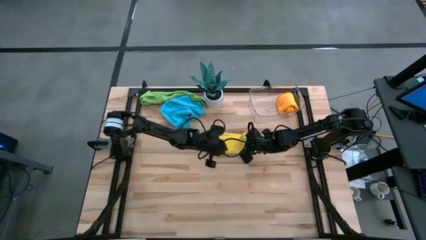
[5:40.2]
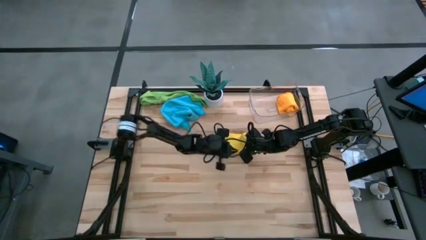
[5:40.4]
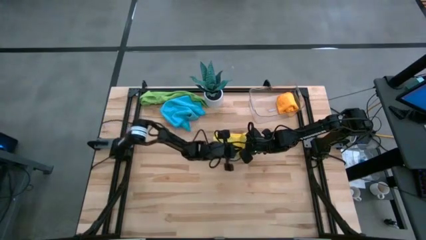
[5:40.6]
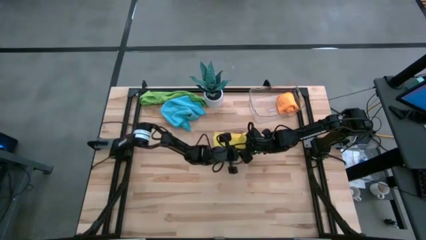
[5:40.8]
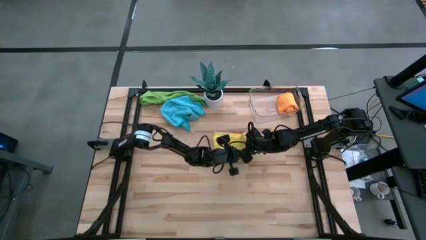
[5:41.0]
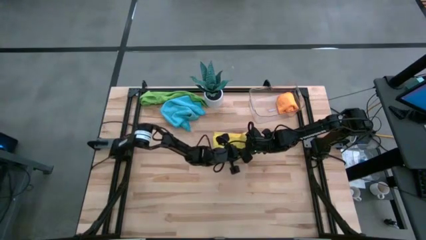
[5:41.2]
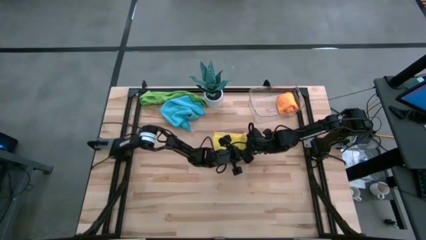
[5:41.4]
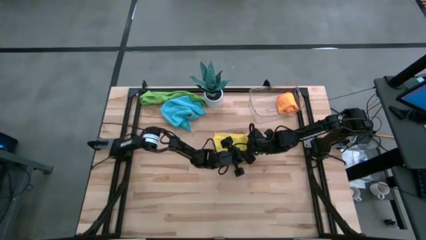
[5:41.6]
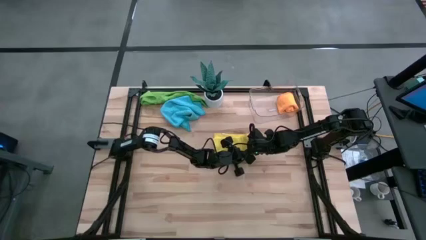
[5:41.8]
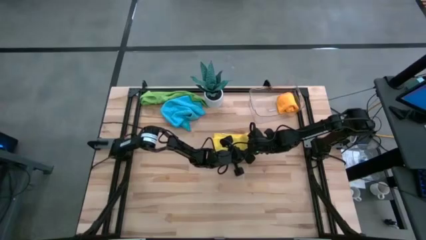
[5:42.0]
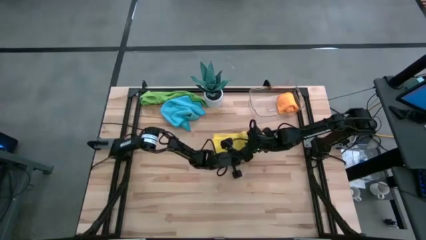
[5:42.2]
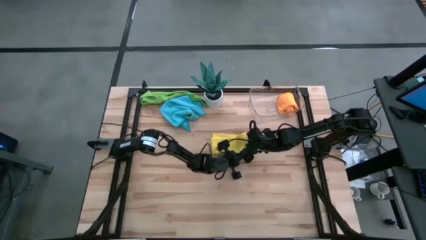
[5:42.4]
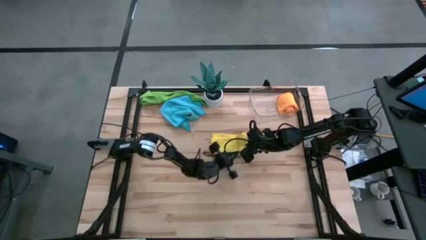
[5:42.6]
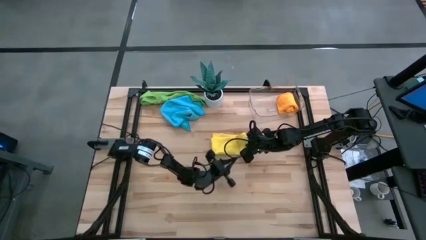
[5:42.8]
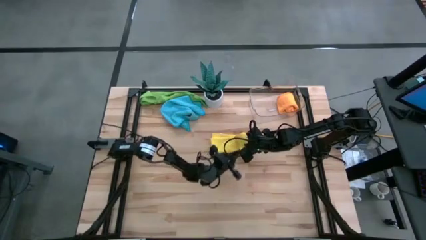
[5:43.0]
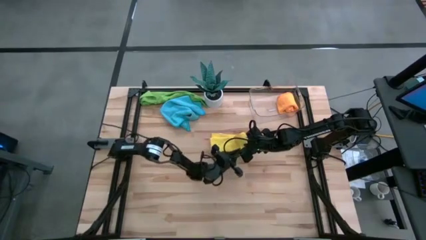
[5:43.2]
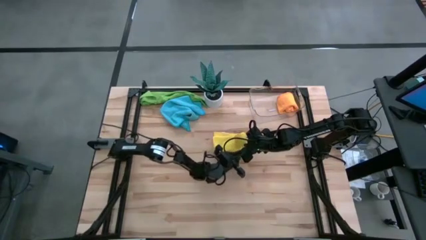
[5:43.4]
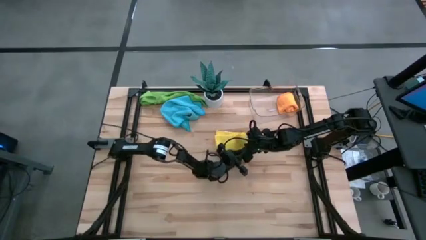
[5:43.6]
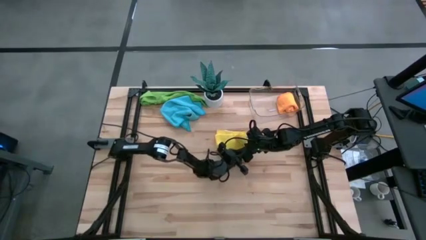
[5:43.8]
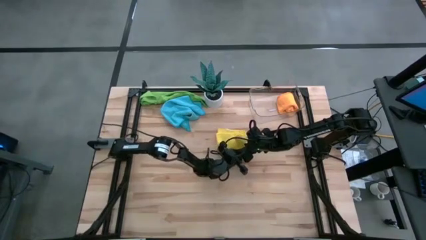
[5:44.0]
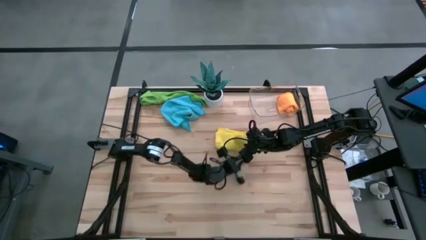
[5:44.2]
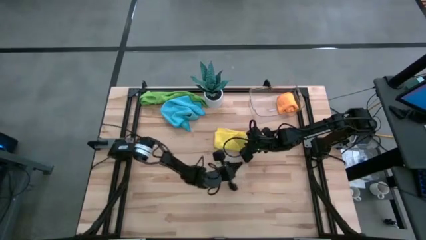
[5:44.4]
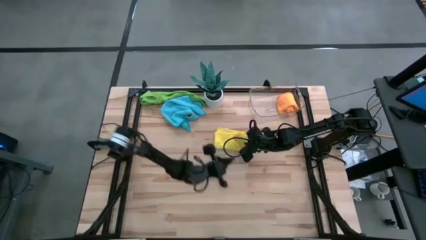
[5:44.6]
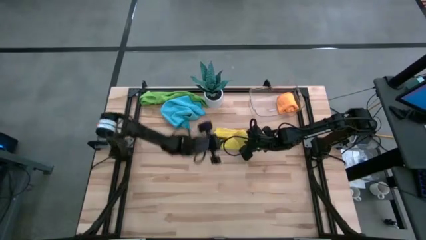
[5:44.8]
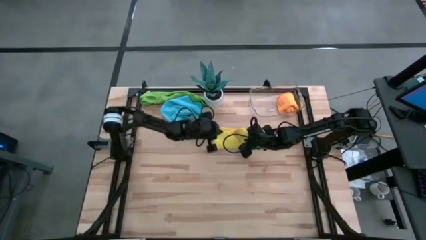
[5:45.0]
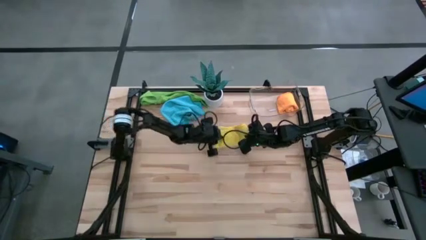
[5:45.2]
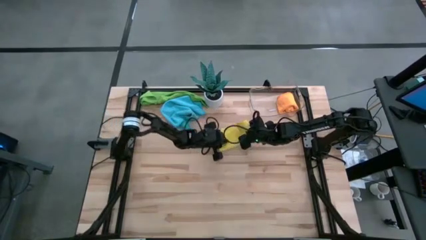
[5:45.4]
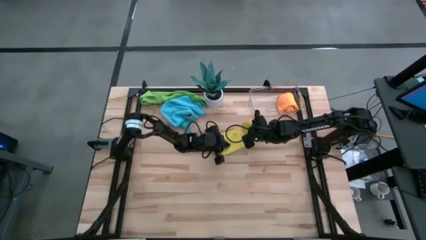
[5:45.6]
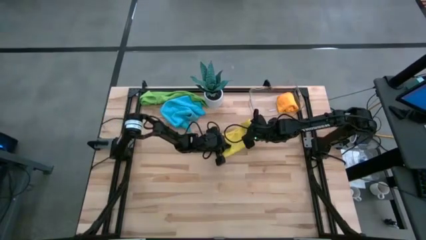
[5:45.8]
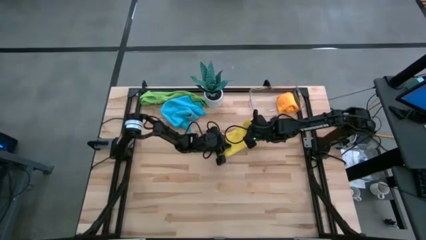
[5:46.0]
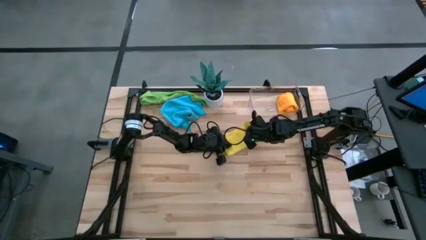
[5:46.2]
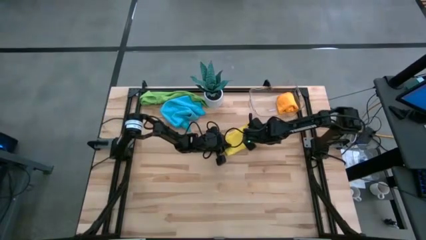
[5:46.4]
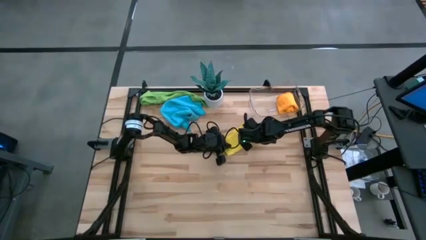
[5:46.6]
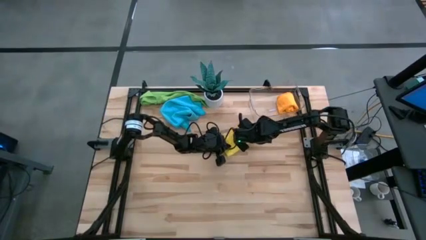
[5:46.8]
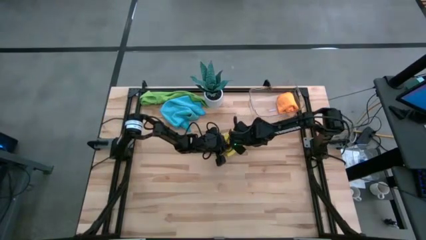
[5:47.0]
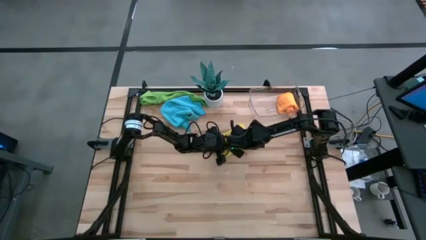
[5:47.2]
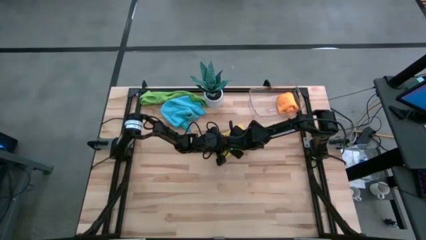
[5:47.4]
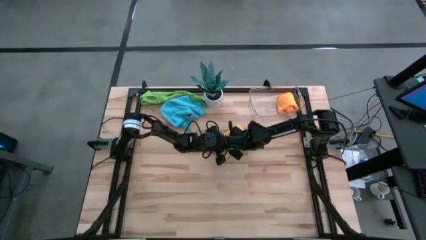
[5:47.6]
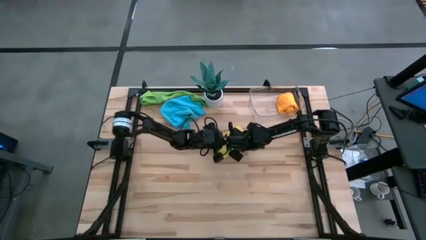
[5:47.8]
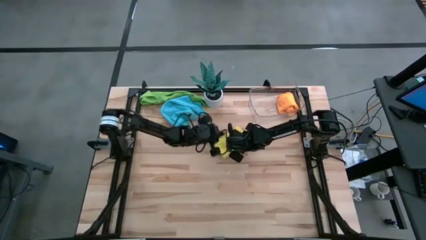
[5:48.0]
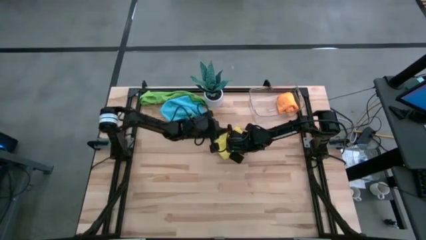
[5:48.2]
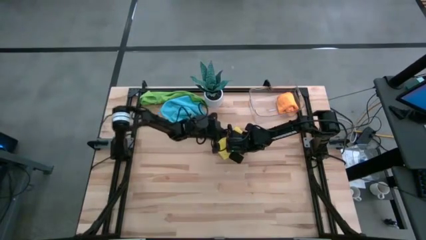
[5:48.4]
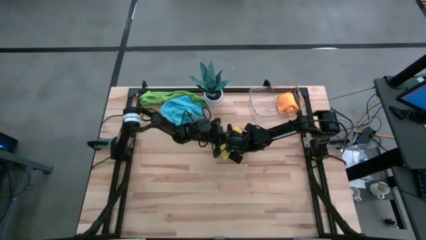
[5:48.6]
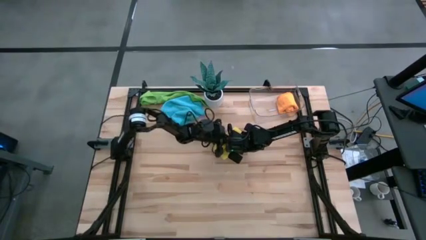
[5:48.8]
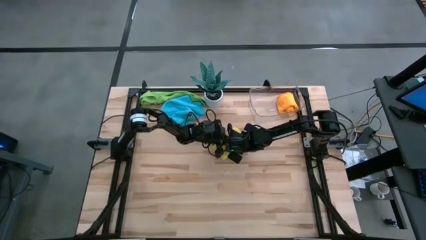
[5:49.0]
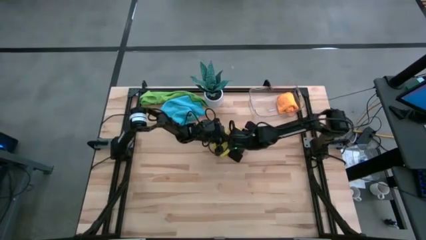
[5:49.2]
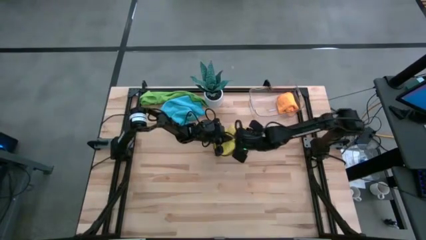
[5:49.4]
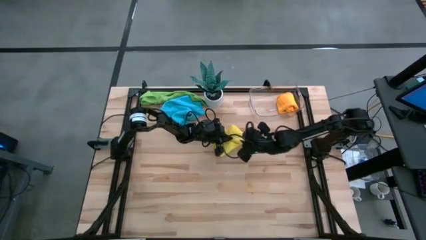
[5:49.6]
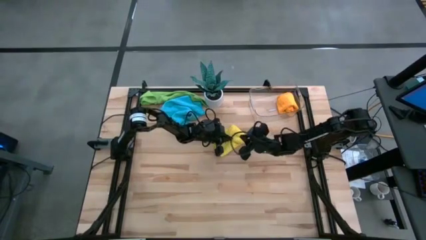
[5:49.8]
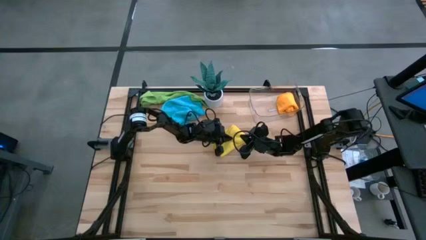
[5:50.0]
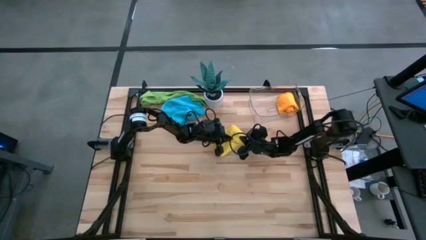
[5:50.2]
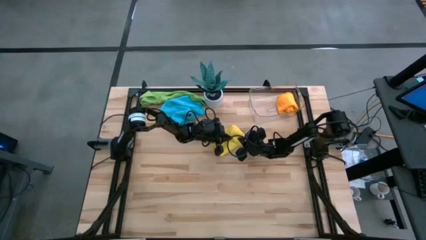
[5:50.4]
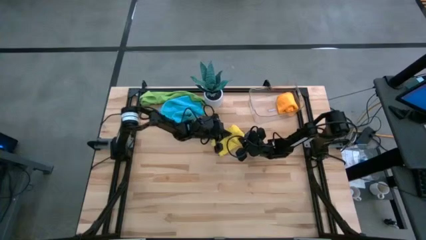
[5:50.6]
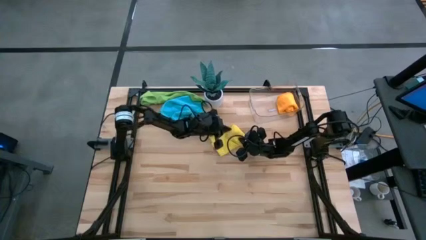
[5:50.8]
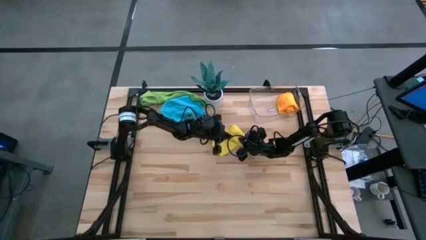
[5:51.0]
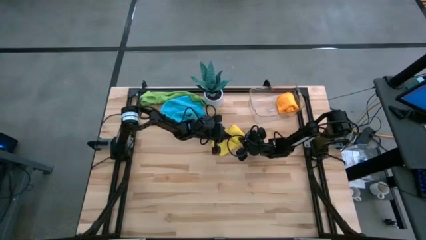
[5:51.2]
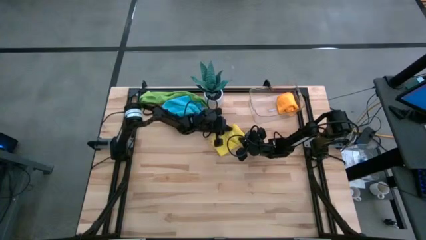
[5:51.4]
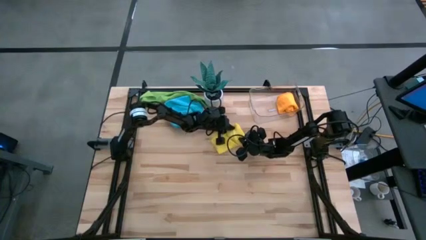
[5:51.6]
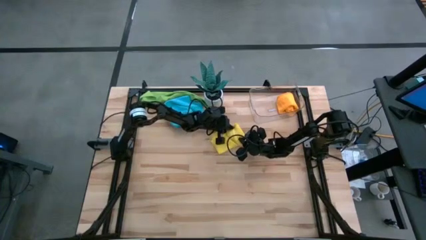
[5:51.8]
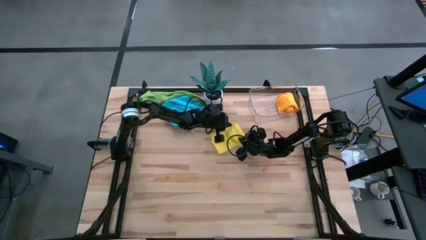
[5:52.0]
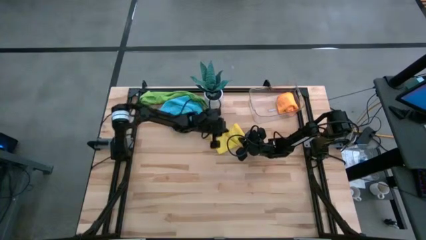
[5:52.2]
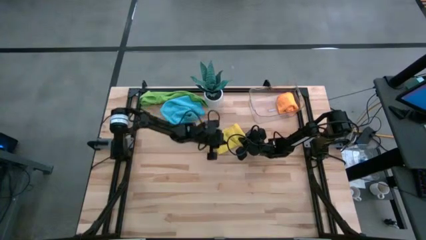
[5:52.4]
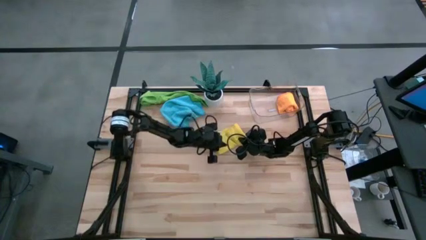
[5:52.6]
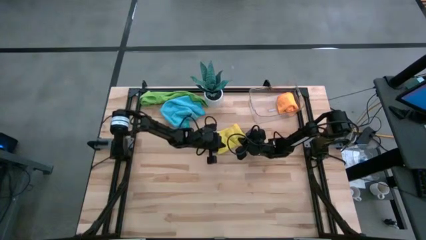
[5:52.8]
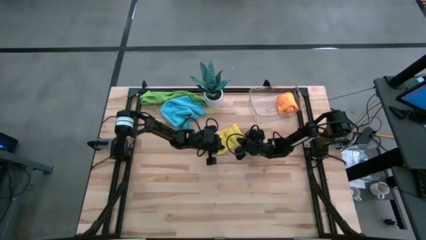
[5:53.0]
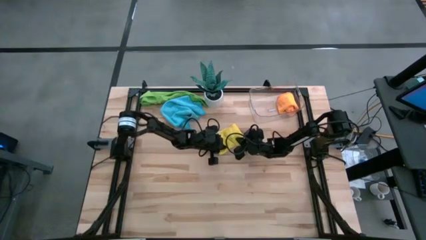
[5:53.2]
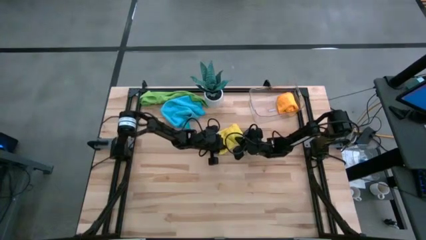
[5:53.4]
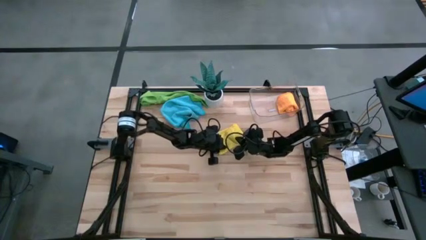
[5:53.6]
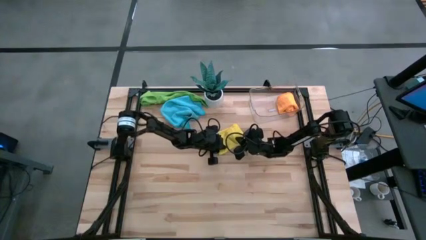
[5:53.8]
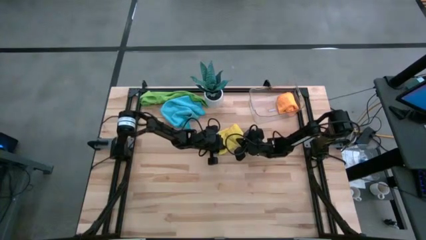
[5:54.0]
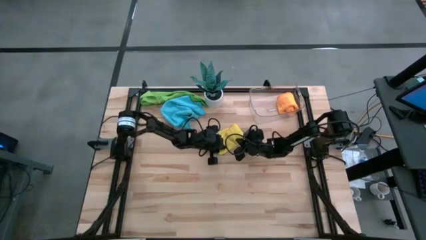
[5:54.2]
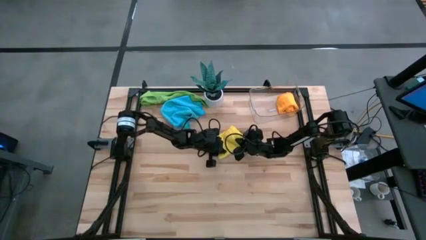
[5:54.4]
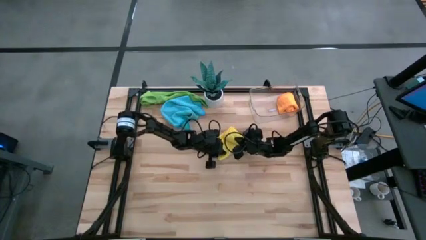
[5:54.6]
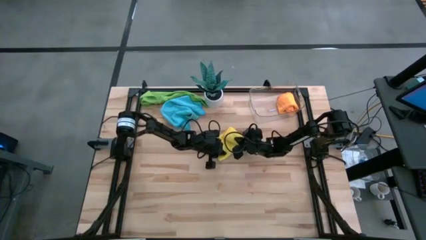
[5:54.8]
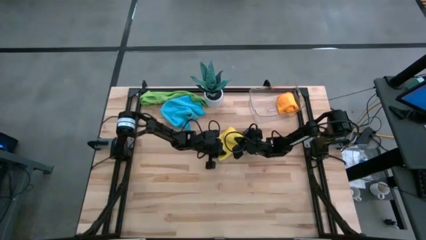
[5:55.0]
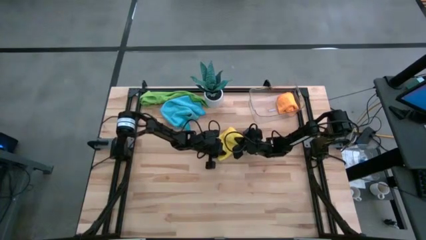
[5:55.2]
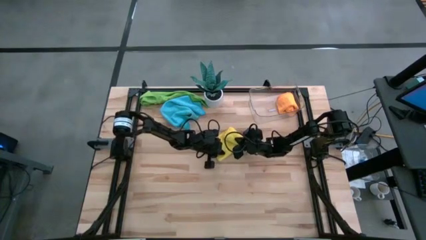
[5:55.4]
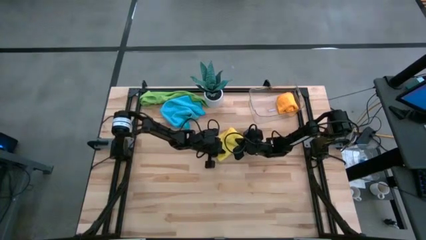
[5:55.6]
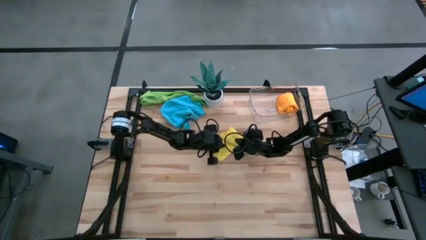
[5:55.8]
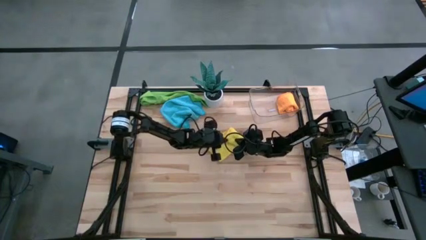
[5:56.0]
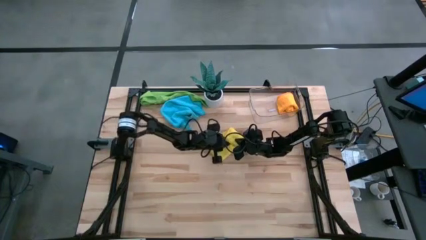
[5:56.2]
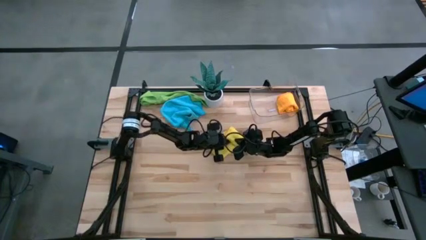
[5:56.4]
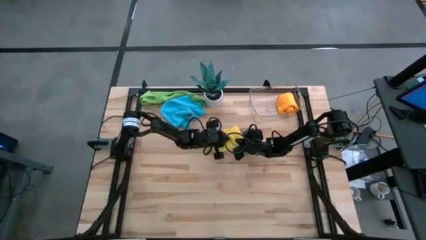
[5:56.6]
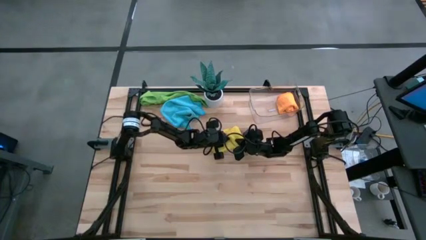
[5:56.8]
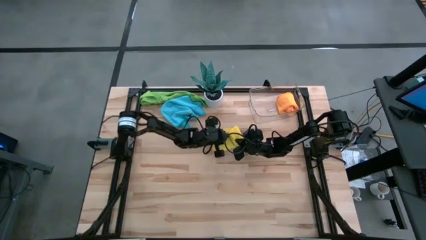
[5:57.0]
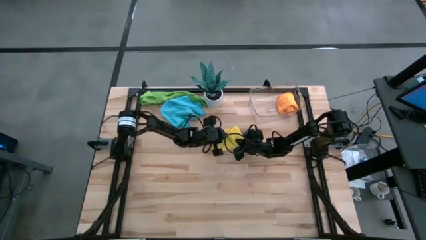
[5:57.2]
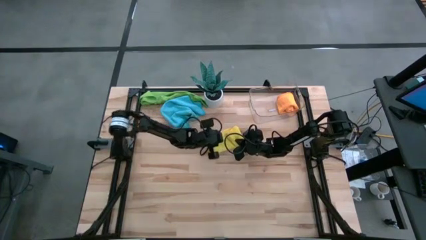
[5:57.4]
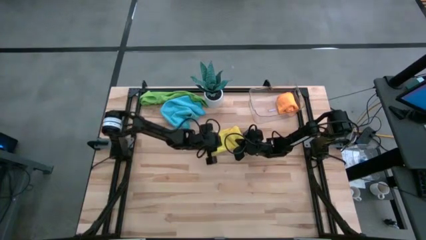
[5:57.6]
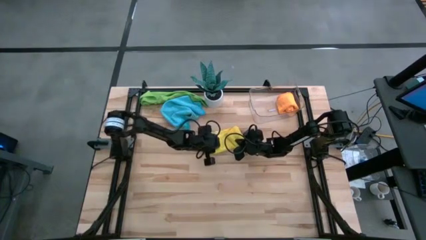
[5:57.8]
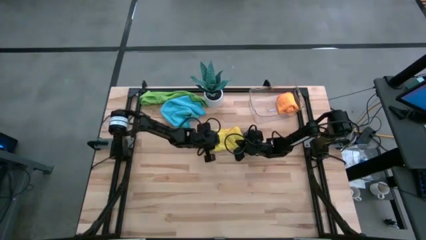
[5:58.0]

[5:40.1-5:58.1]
Task: Roll microfiber towels into tight, uniform cylinder then place into a basket
Roll the yellow microfiber cloth
